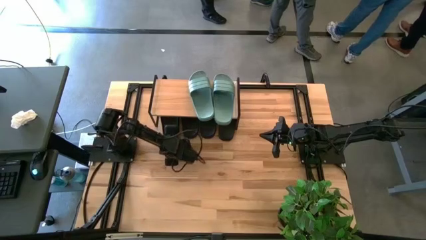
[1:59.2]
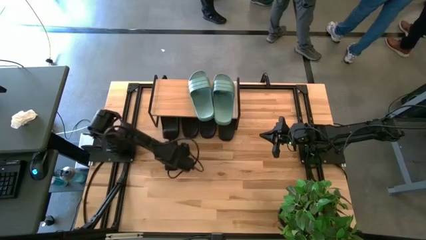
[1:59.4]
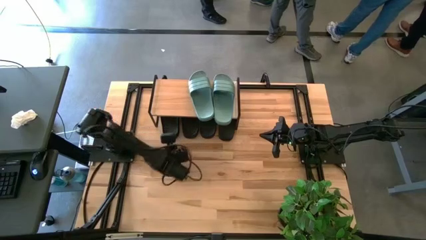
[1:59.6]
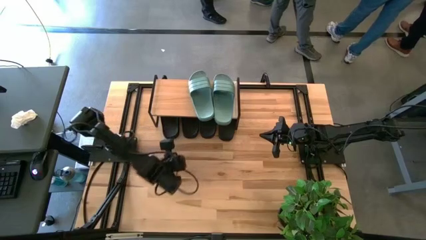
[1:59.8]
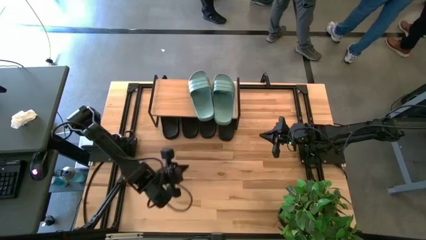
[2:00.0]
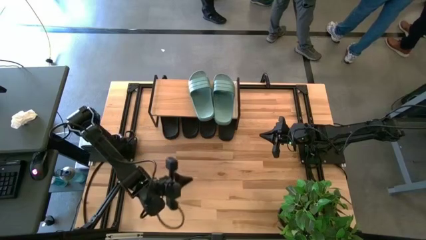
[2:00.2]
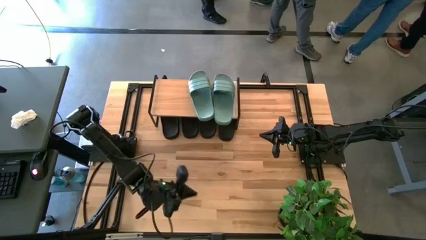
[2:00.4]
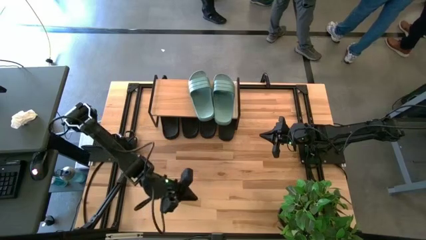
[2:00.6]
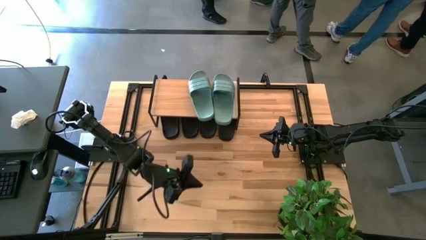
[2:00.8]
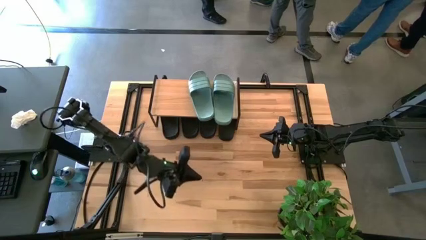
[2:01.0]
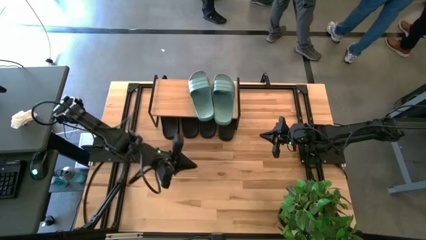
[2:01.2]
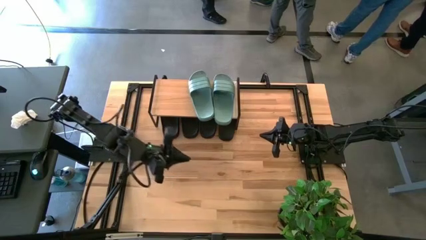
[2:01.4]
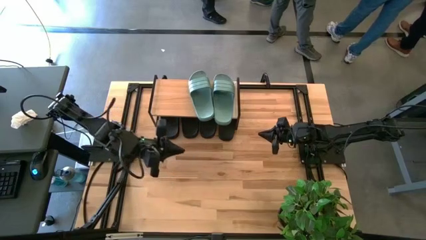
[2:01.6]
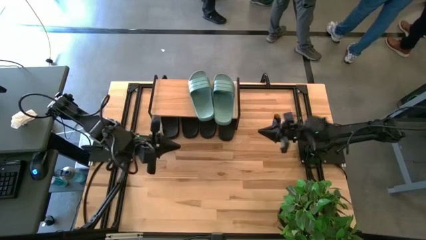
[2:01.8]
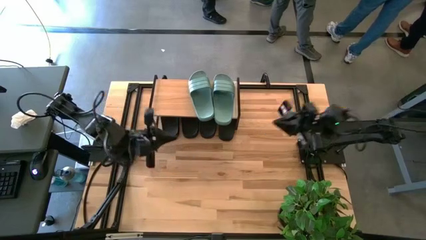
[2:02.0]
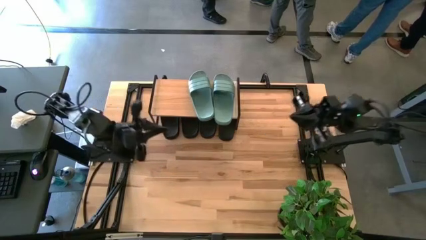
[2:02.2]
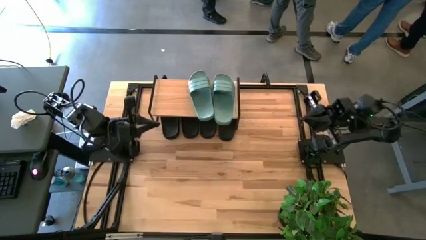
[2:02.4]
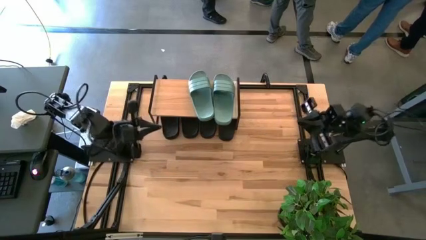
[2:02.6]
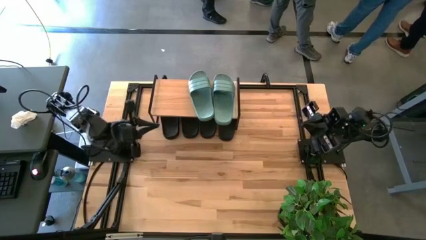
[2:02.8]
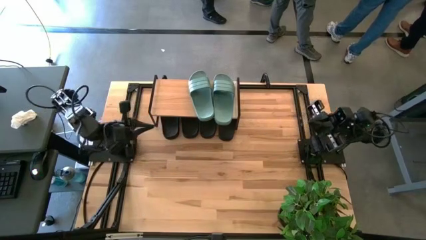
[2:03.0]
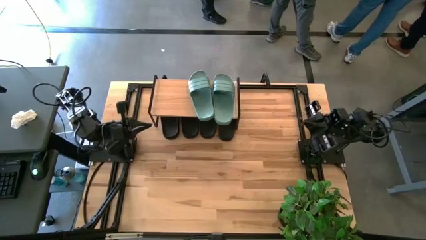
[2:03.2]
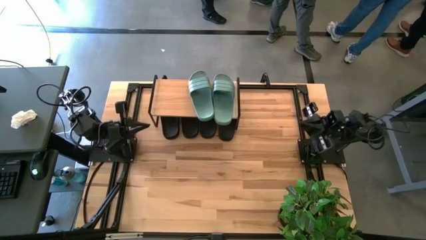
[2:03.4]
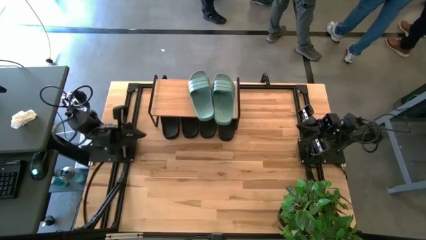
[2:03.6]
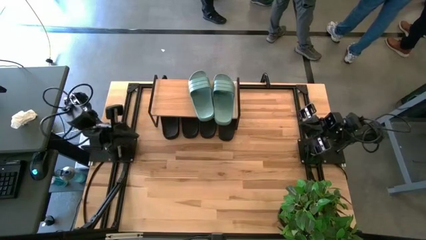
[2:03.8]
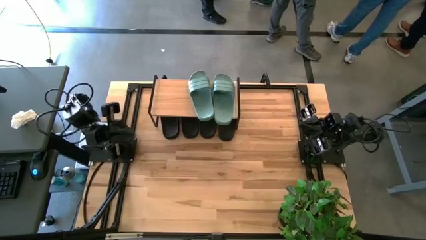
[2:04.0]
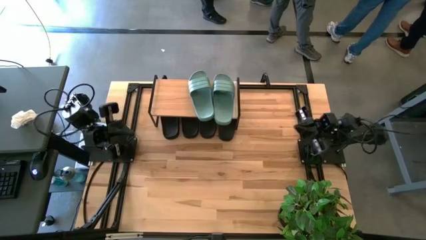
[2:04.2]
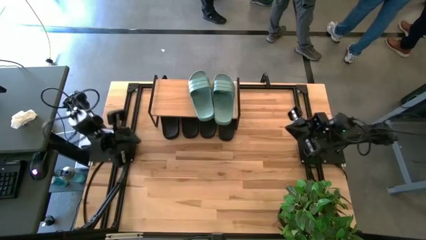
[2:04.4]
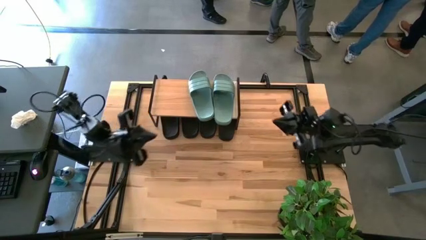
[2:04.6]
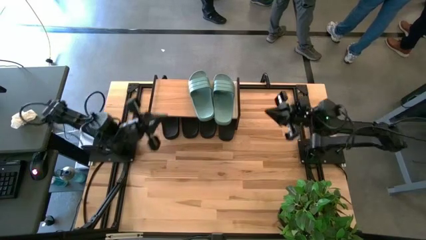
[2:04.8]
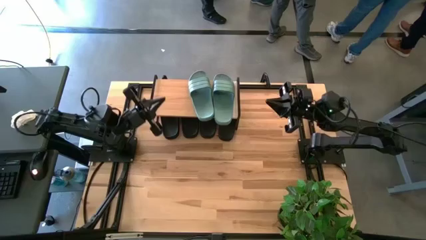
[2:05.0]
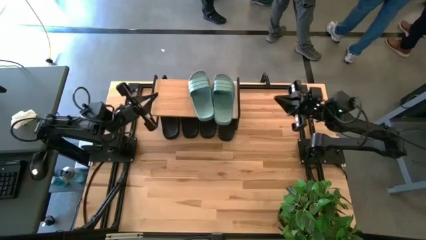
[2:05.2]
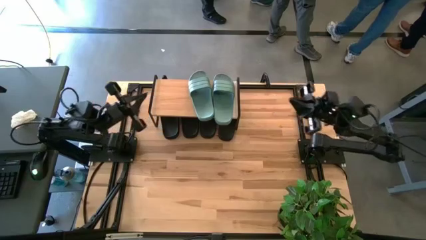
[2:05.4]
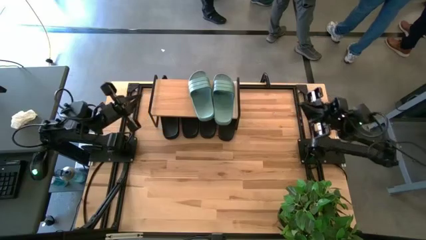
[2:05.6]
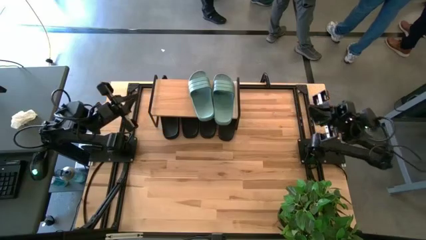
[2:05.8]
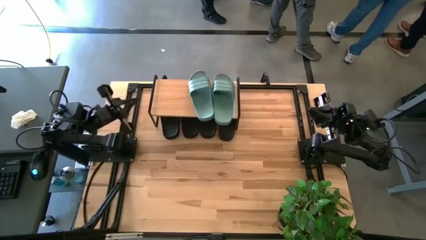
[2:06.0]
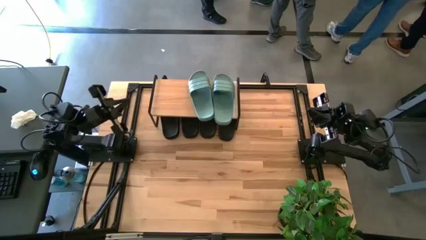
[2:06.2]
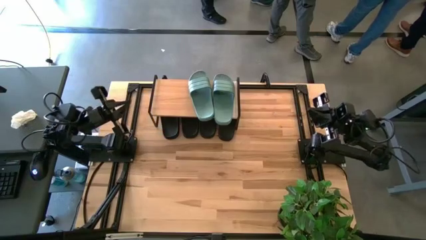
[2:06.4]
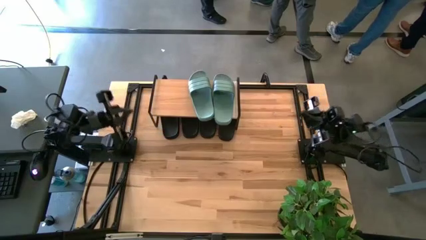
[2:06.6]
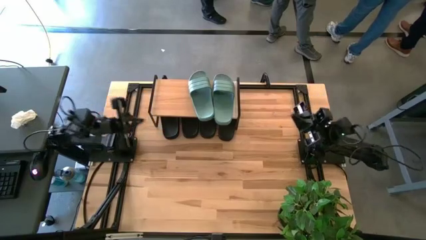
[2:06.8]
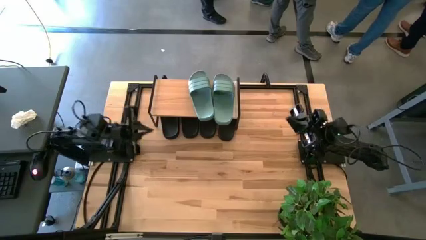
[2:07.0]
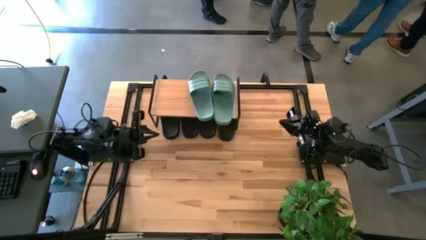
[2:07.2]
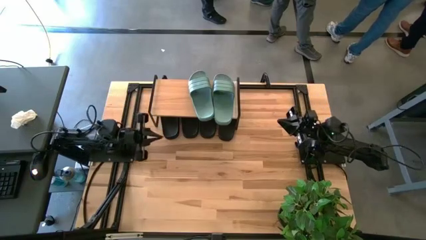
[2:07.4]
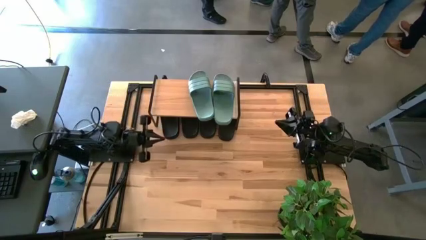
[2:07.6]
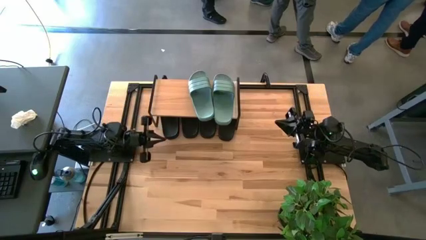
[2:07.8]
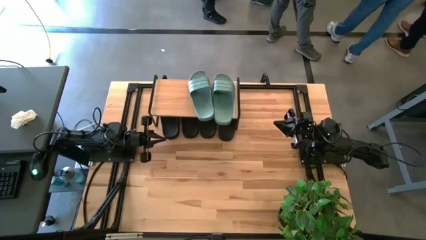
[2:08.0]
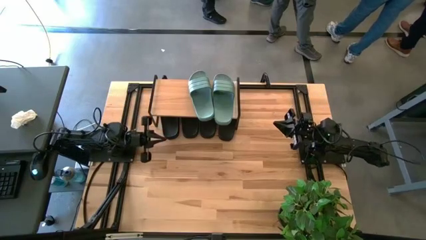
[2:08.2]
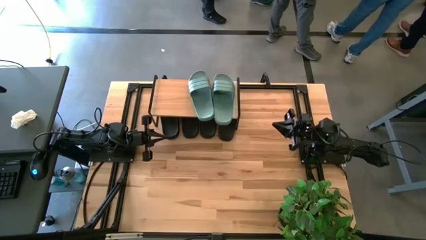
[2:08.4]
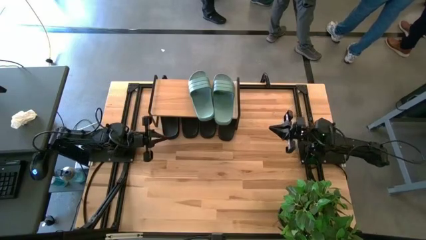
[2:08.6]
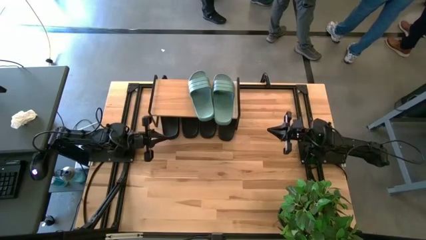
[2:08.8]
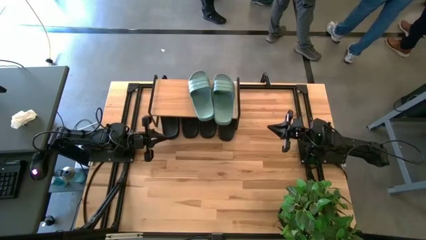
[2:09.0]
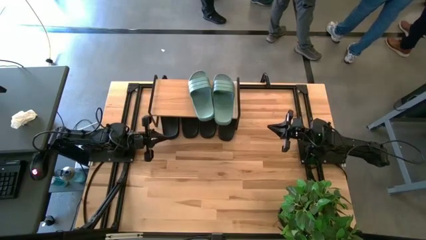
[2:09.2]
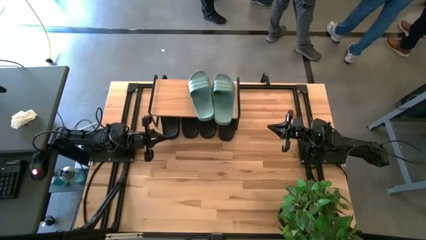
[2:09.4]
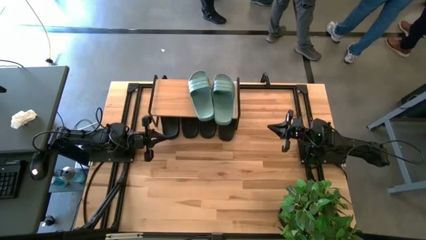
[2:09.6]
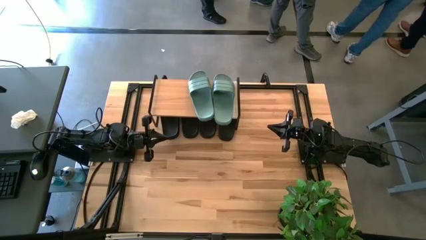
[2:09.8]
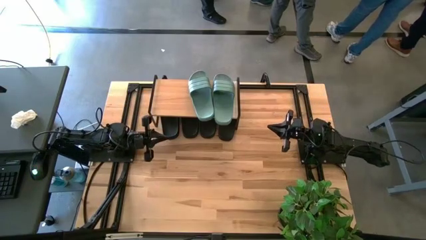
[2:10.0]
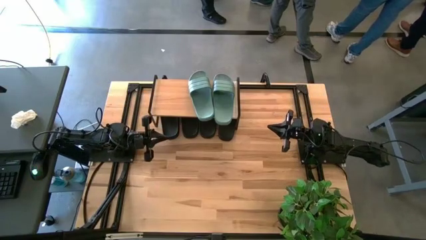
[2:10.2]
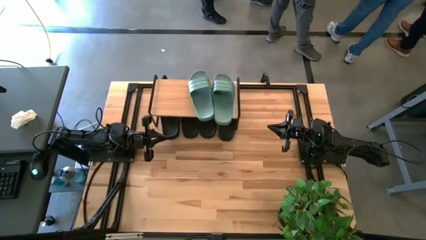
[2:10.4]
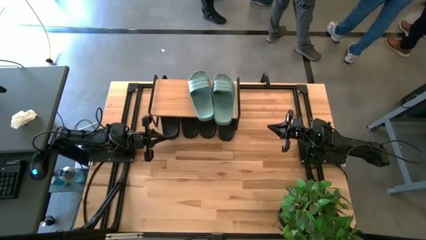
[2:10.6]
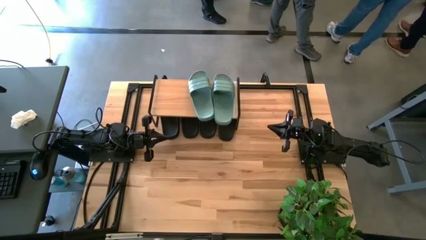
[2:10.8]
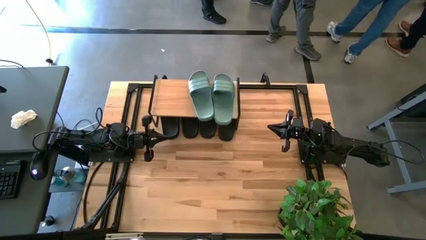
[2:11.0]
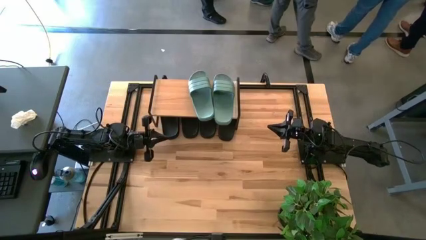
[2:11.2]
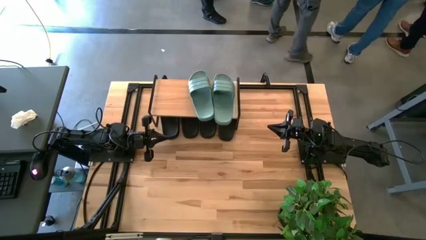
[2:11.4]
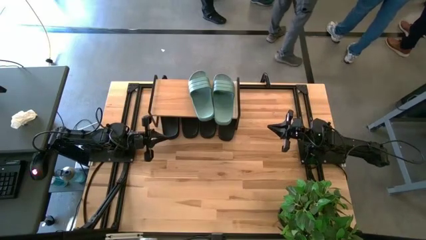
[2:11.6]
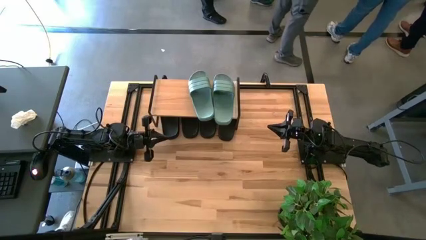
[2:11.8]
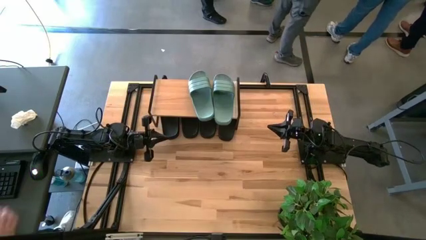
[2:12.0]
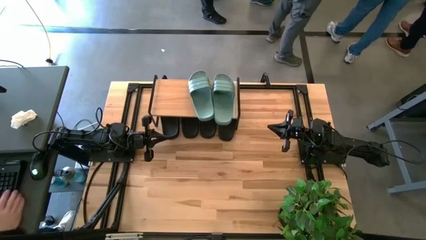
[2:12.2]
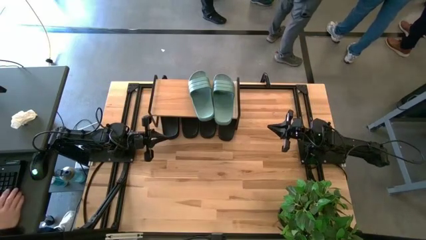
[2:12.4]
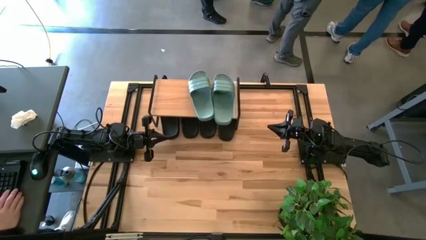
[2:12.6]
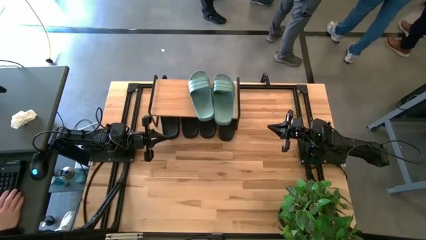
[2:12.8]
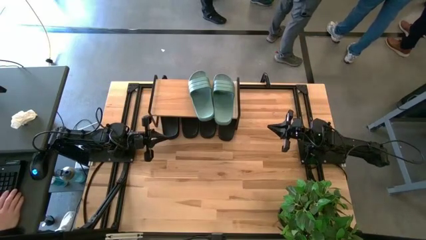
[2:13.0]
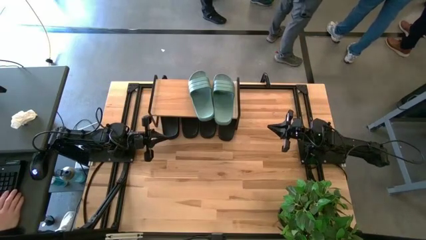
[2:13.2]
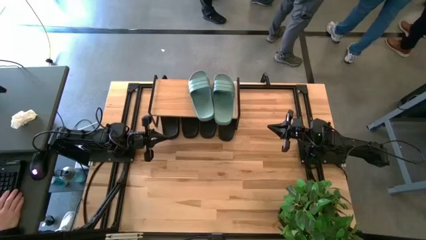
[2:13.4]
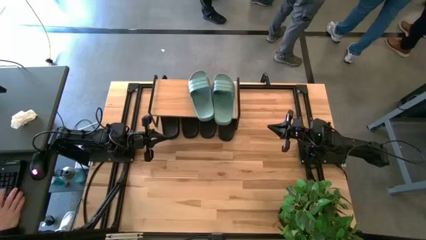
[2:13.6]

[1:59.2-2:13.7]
Task: Pick and place slides into the shelf
Return to Home Position
